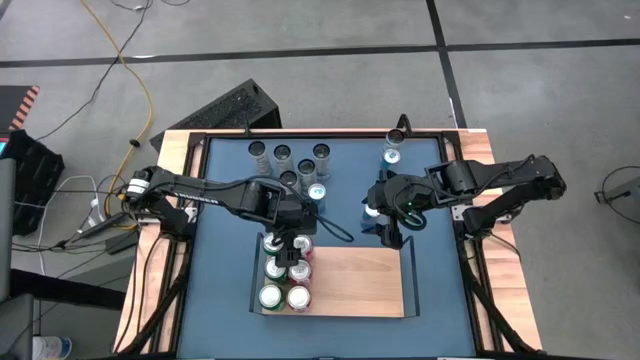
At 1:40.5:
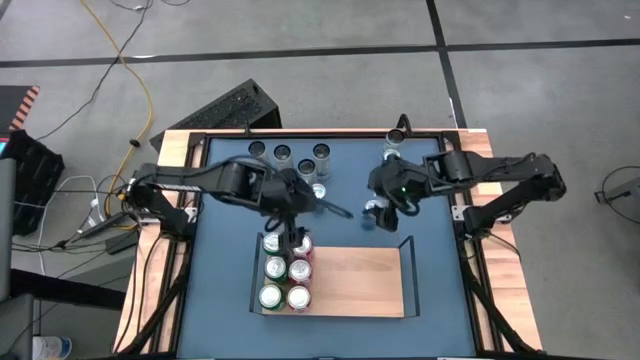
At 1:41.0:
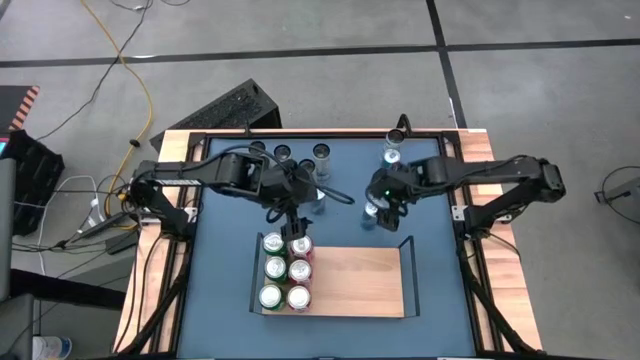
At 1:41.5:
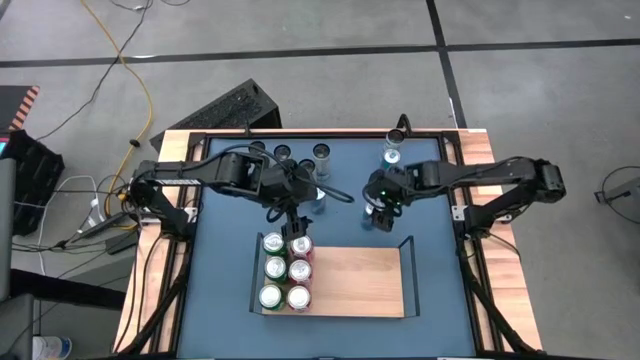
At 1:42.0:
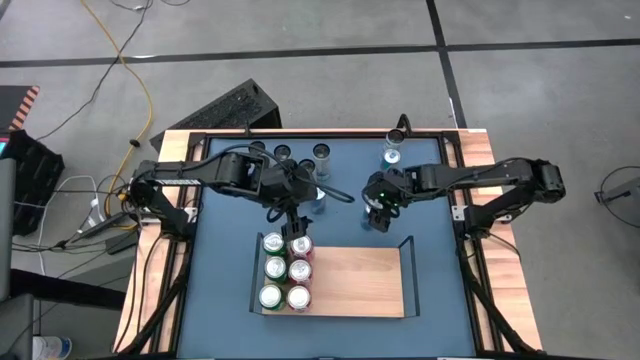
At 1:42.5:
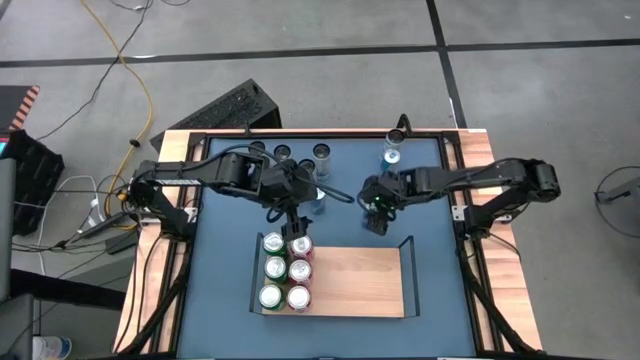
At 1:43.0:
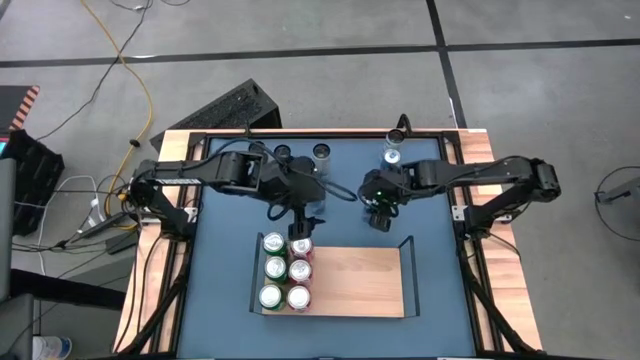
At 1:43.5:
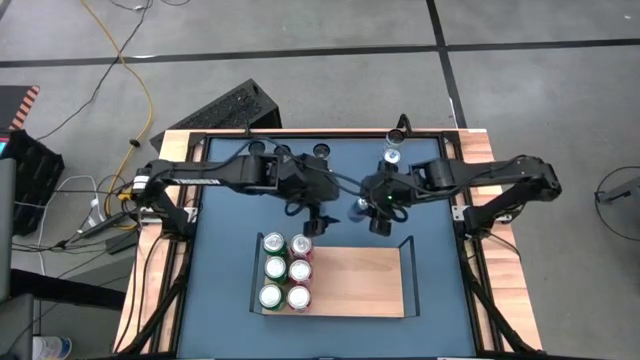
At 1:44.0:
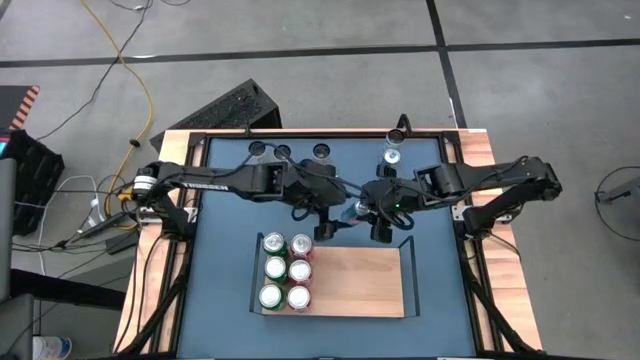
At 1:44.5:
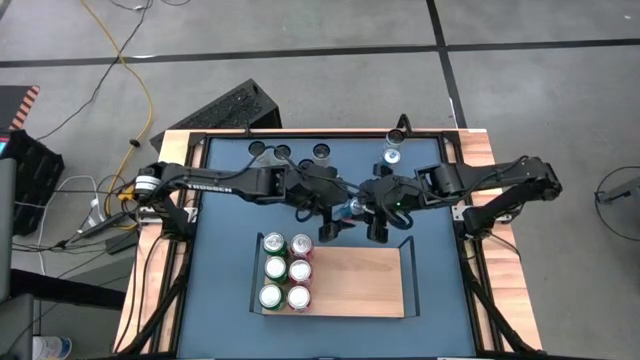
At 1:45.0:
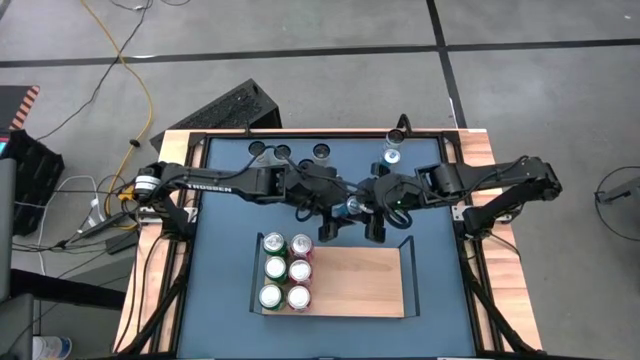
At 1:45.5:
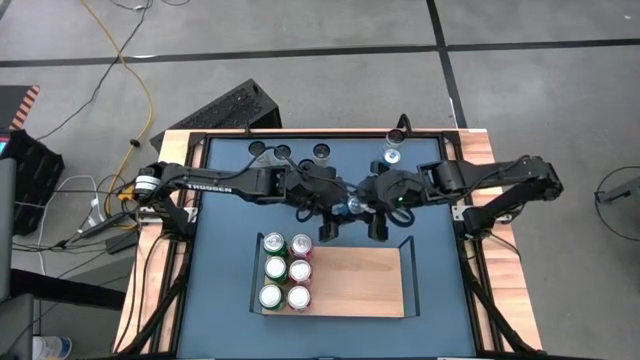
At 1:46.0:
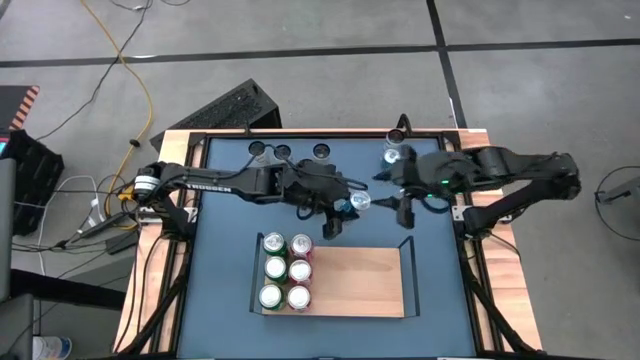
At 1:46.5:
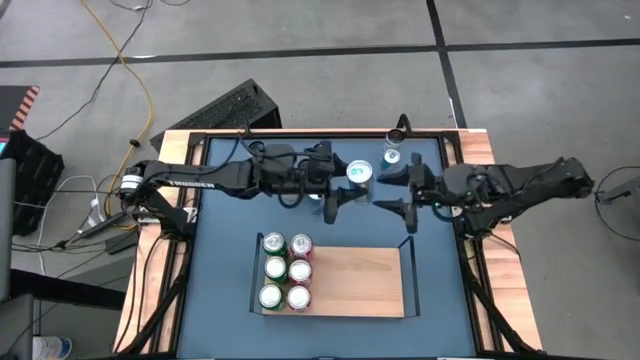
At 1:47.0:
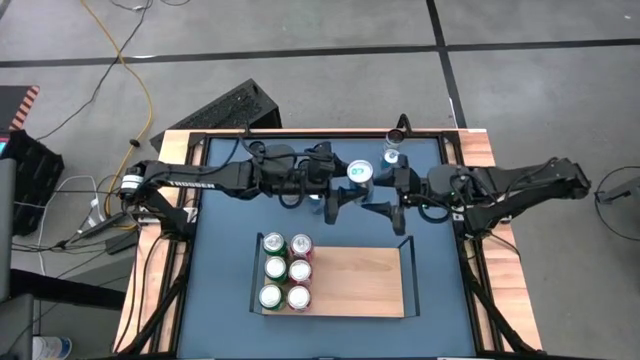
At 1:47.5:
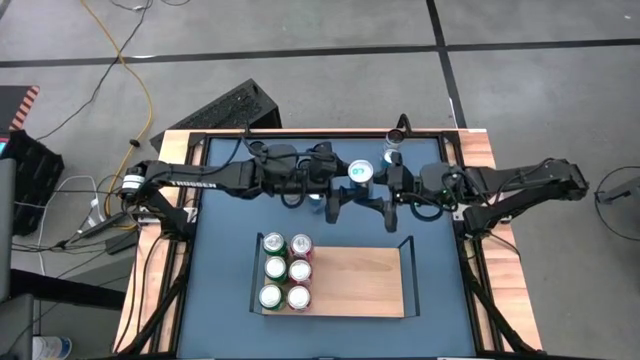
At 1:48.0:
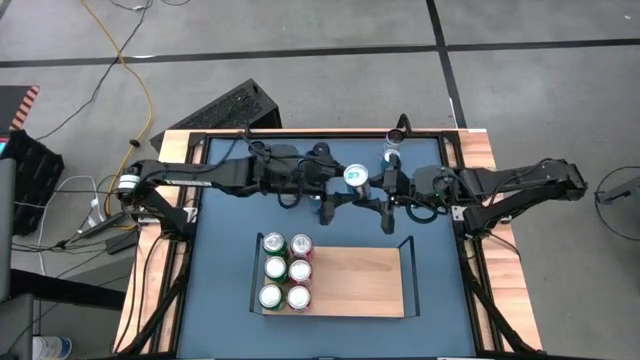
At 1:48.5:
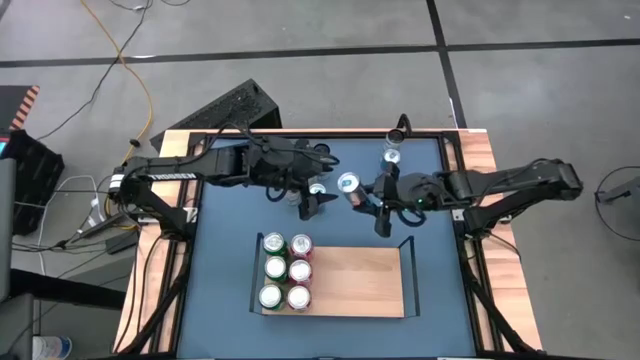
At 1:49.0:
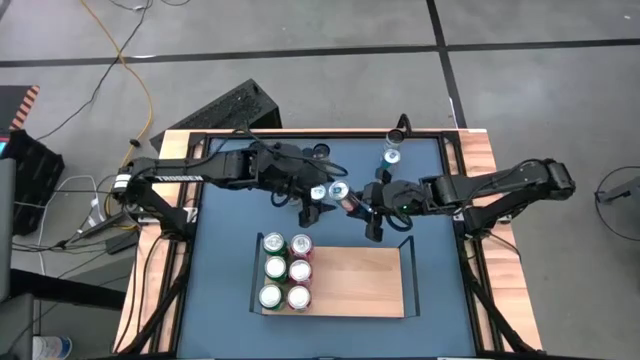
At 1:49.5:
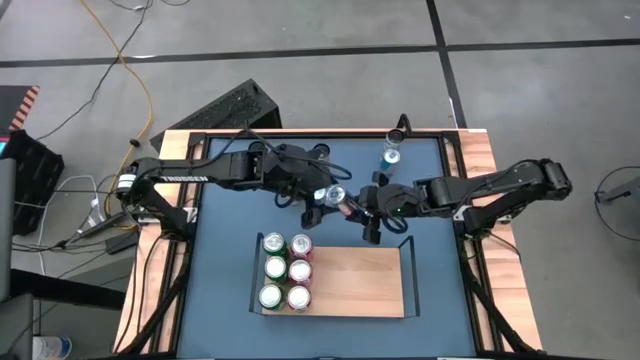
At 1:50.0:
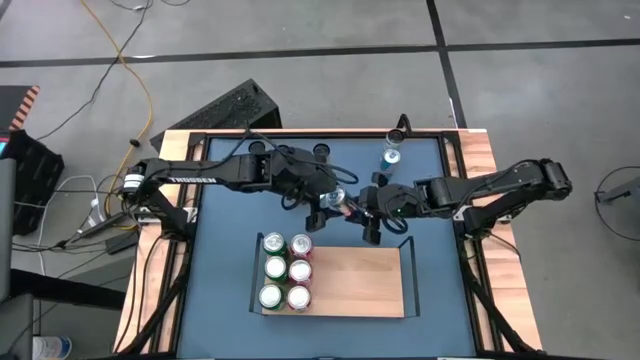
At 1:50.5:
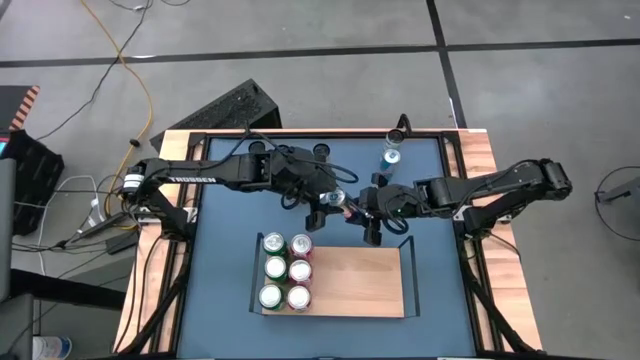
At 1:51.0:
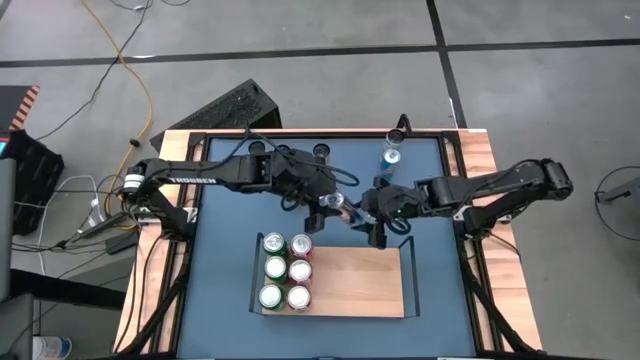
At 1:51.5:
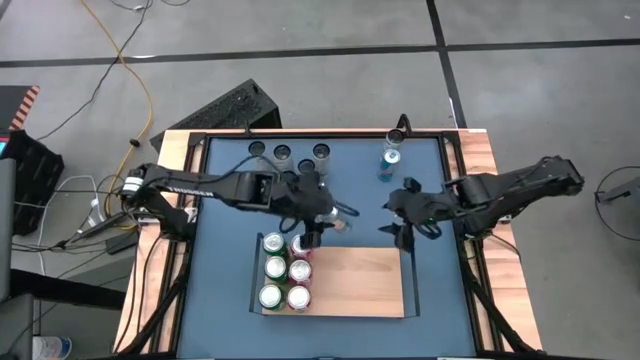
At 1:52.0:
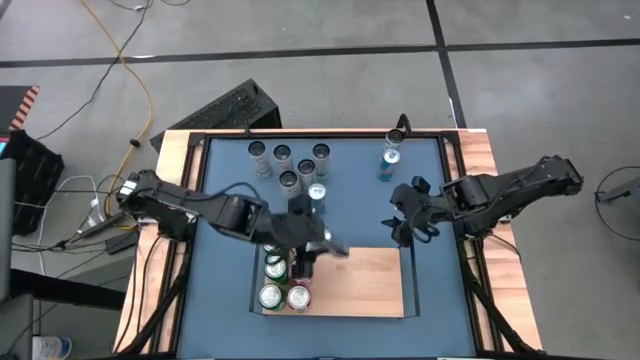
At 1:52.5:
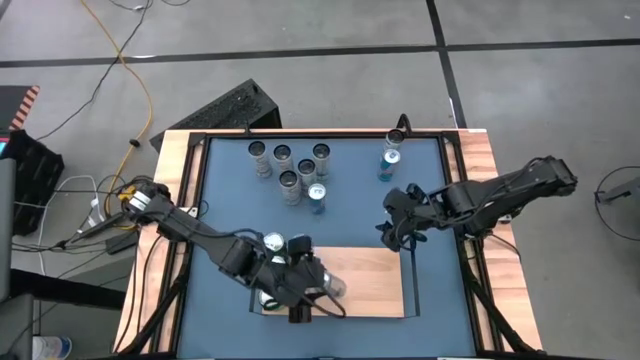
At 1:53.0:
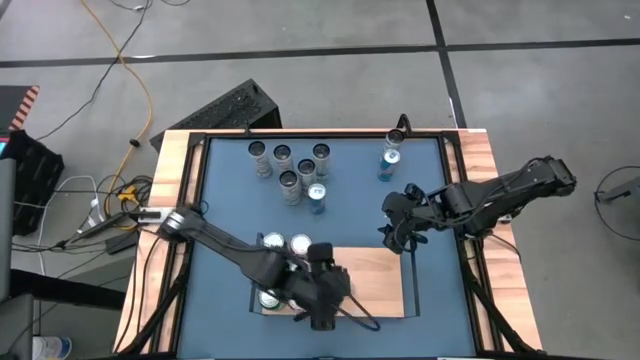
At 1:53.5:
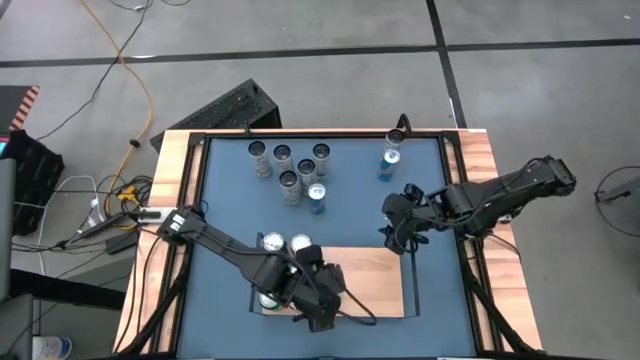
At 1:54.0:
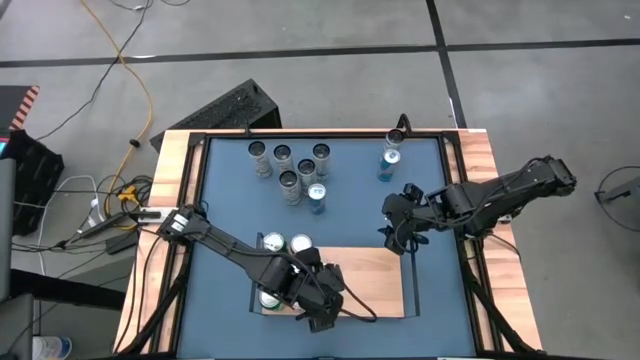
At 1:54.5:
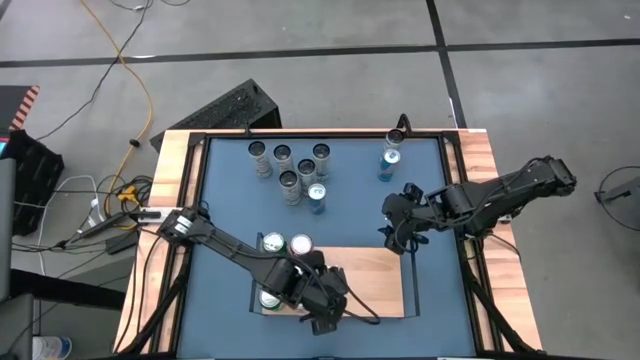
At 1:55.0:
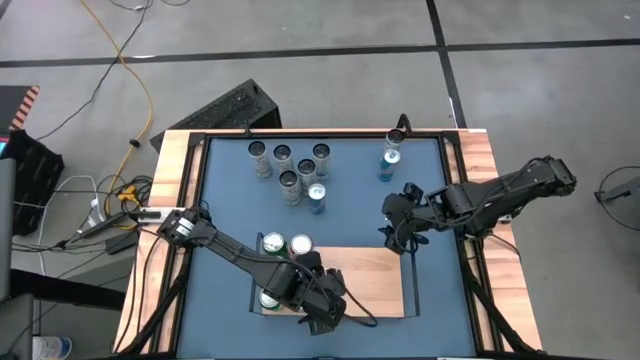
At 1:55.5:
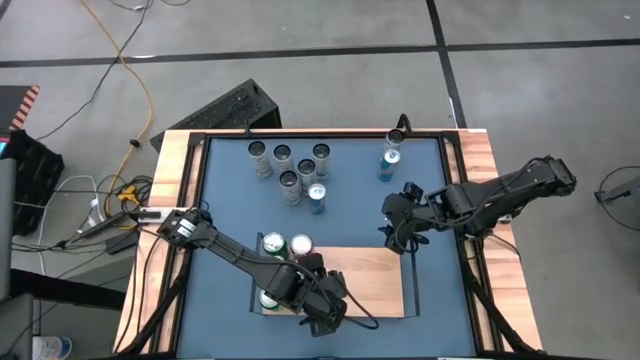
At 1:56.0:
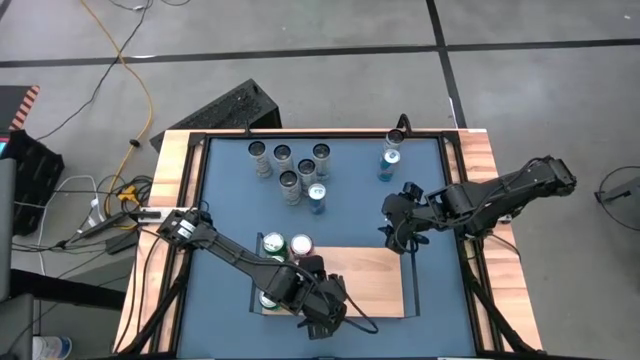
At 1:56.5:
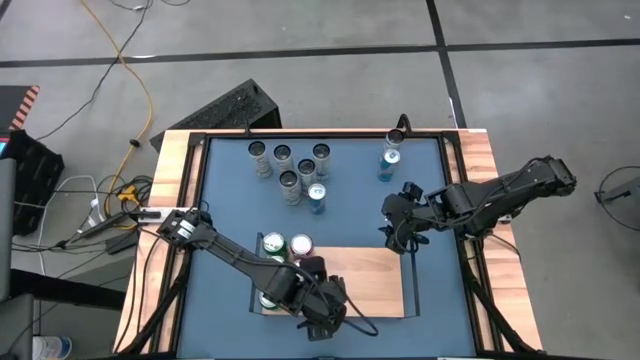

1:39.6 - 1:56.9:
Task: Place canned beverage on shelf
Put the bottom right blue soda can on the shelf

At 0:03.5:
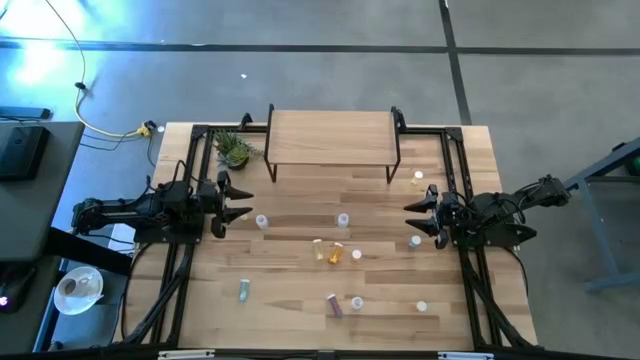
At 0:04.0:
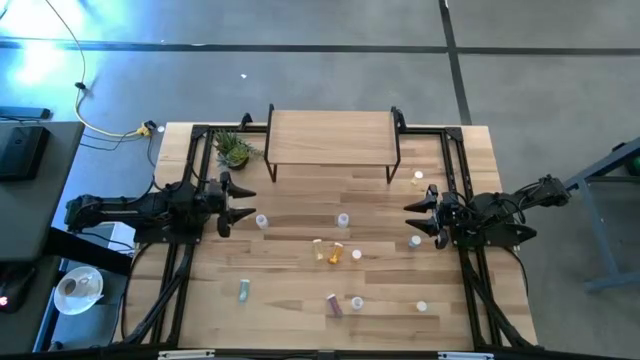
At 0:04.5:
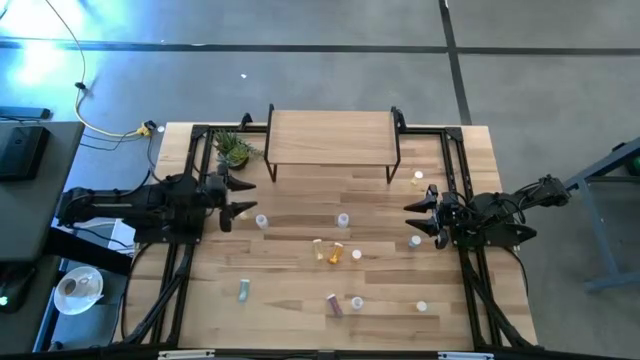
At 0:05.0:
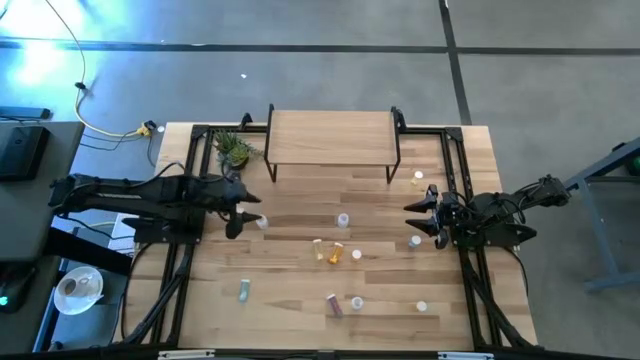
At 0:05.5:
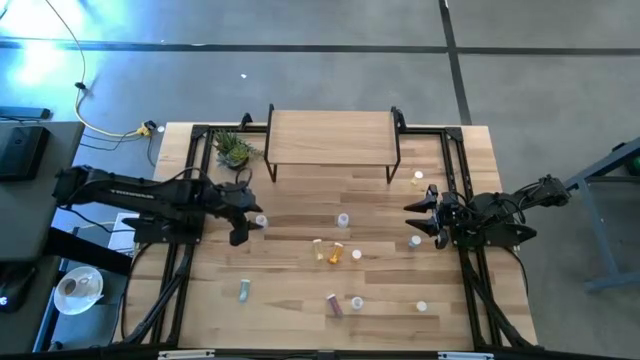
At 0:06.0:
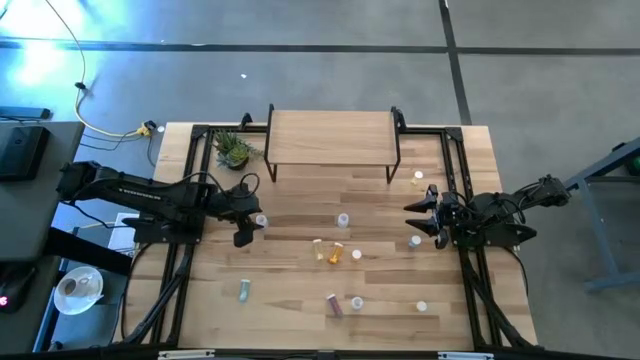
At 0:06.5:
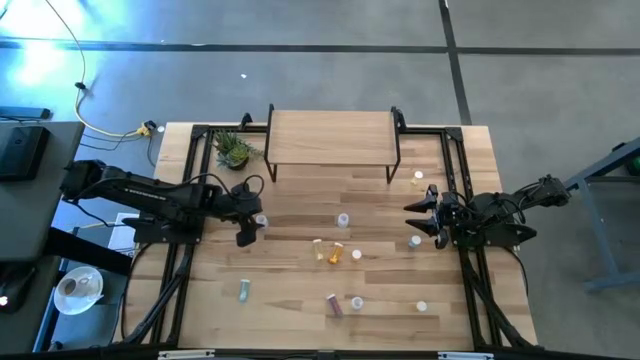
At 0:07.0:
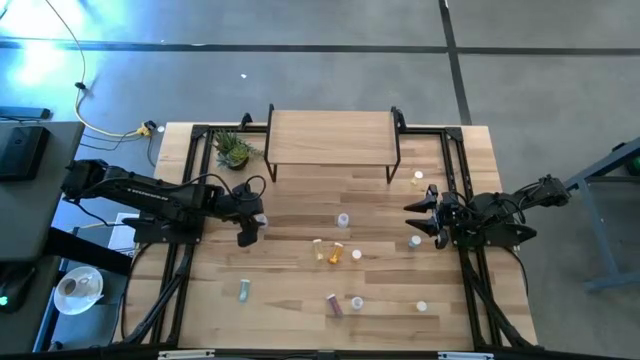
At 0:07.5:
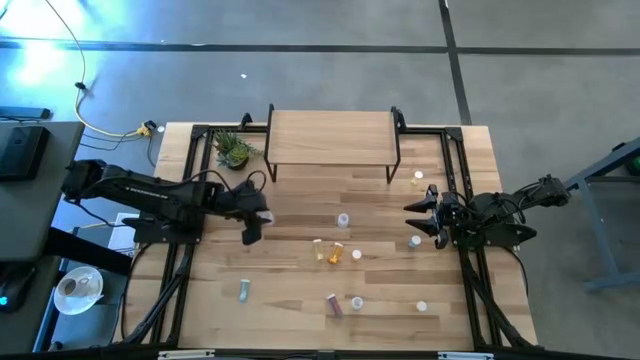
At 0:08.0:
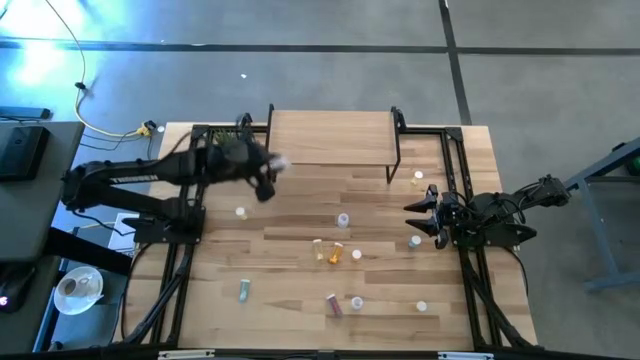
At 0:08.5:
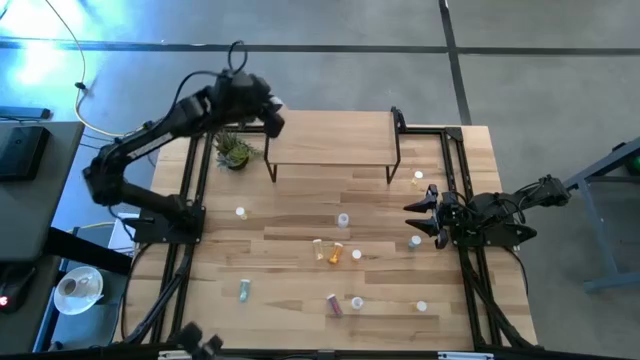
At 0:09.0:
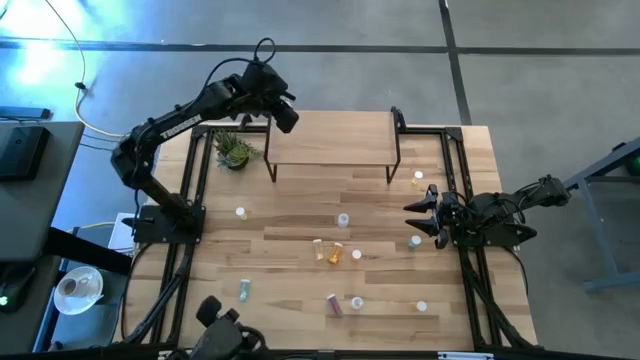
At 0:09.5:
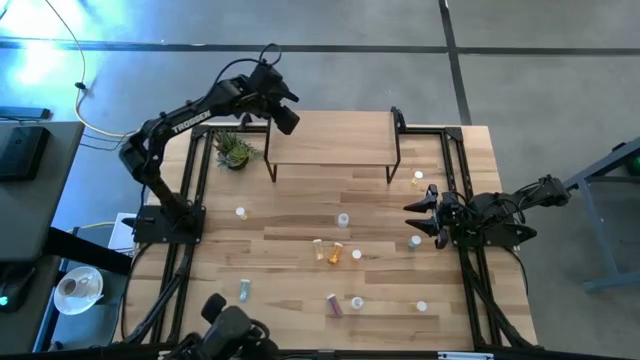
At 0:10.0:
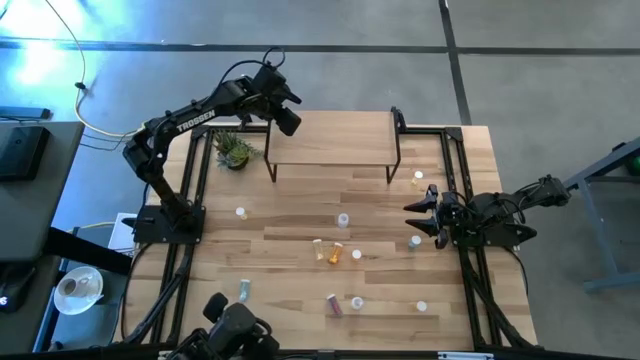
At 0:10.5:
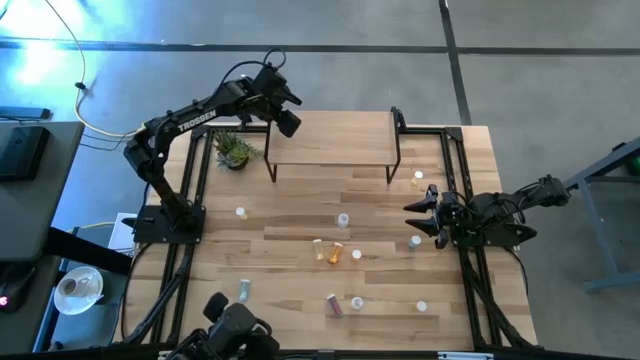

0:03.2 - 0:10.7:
Task: Pick and place medicine bottles onto shelf by color
Put the transparent pill bottle on the shelf
